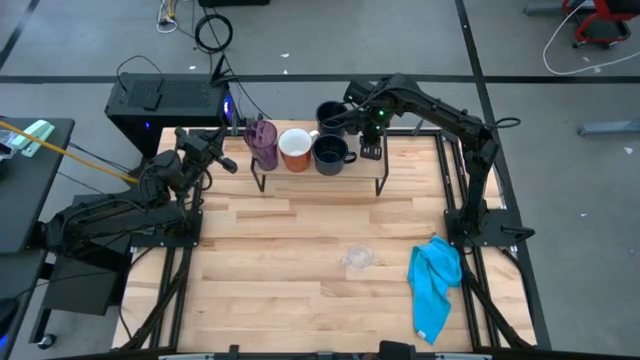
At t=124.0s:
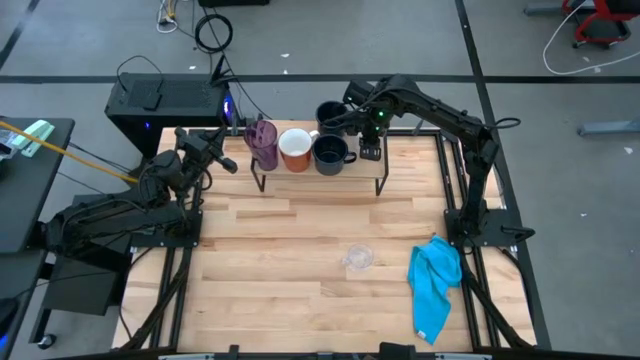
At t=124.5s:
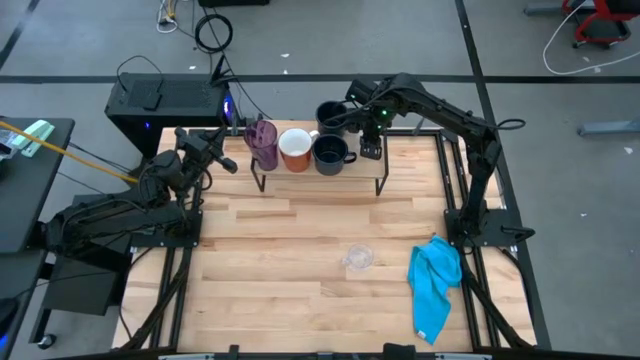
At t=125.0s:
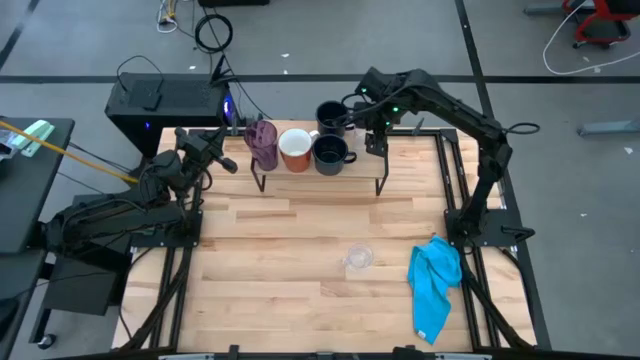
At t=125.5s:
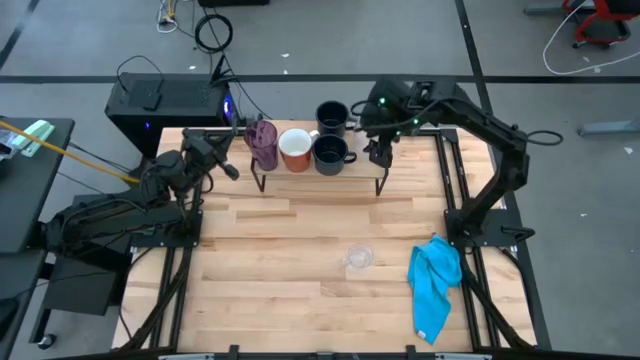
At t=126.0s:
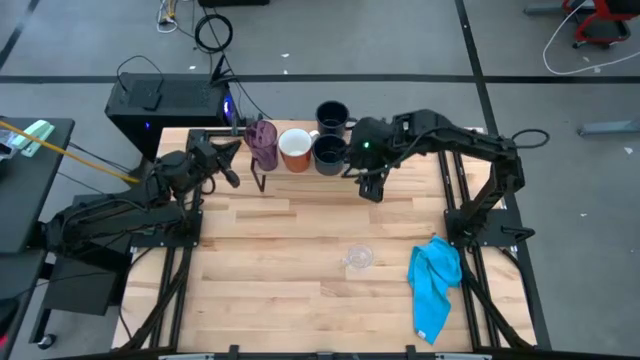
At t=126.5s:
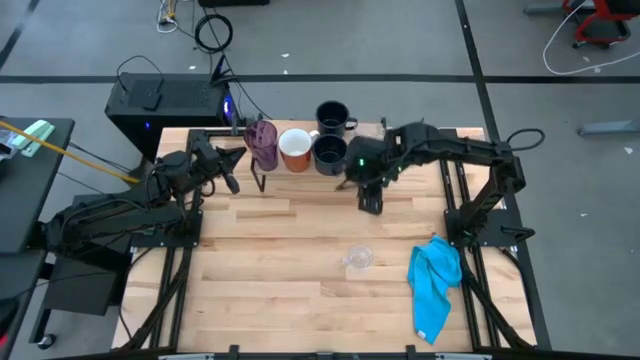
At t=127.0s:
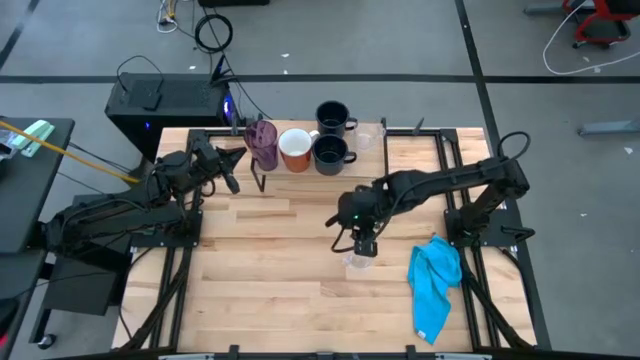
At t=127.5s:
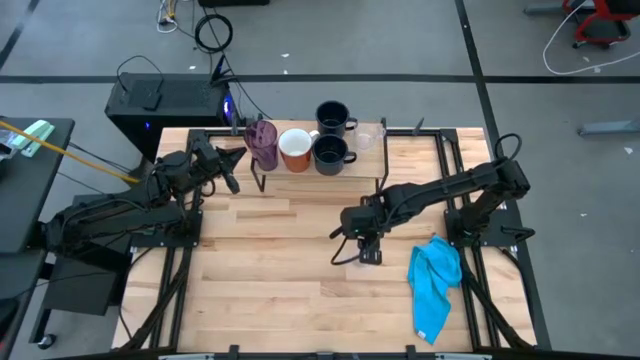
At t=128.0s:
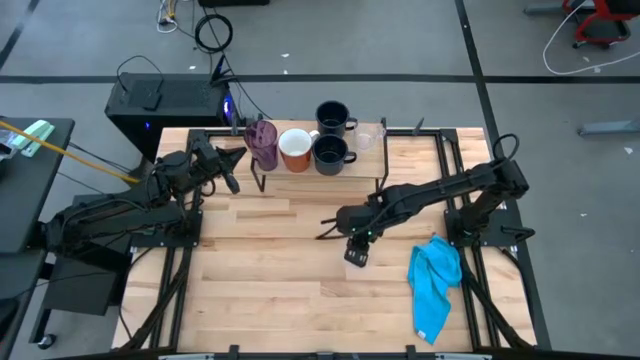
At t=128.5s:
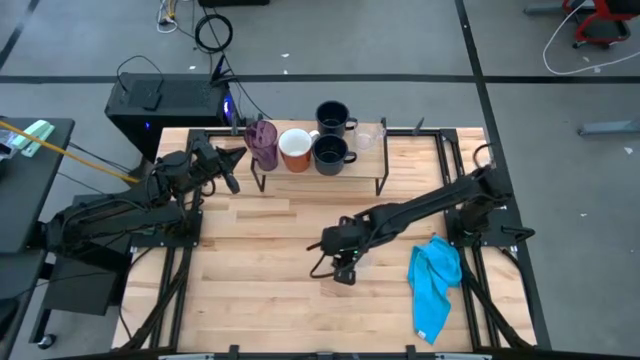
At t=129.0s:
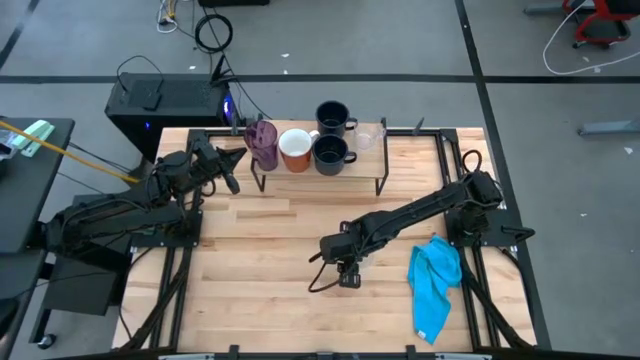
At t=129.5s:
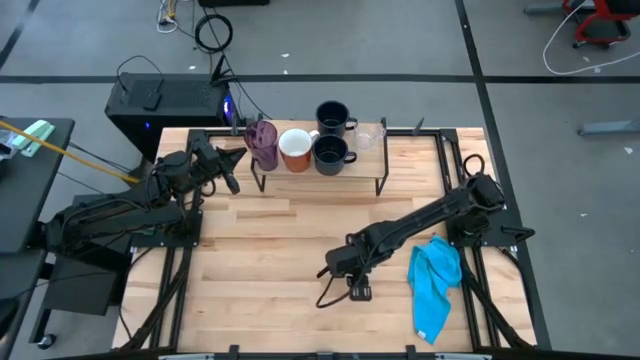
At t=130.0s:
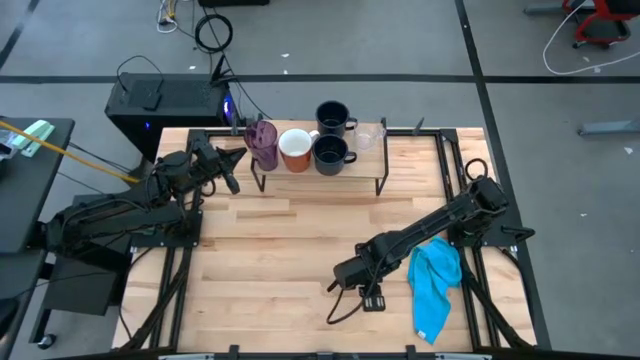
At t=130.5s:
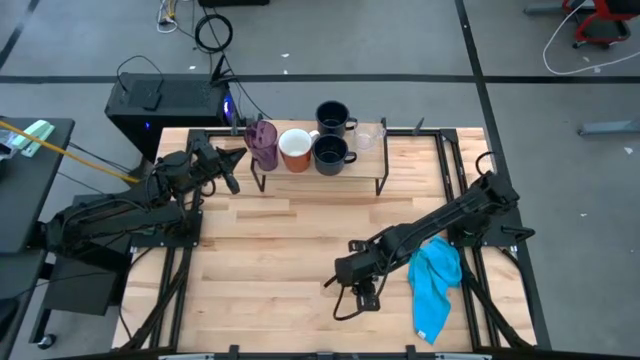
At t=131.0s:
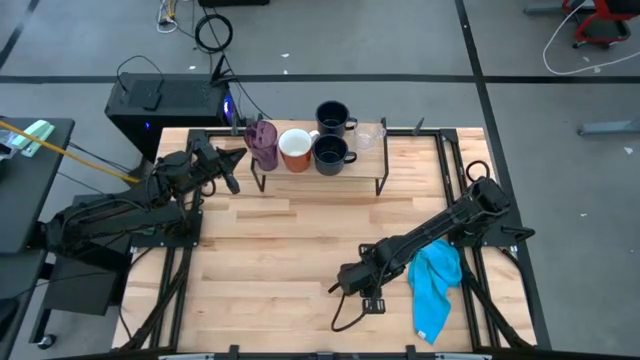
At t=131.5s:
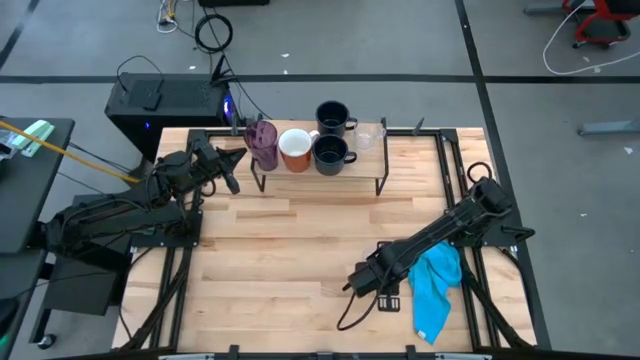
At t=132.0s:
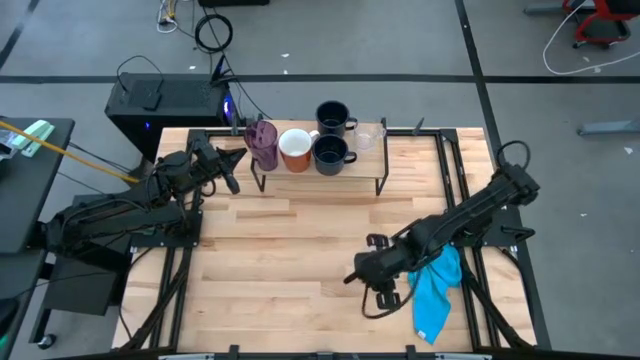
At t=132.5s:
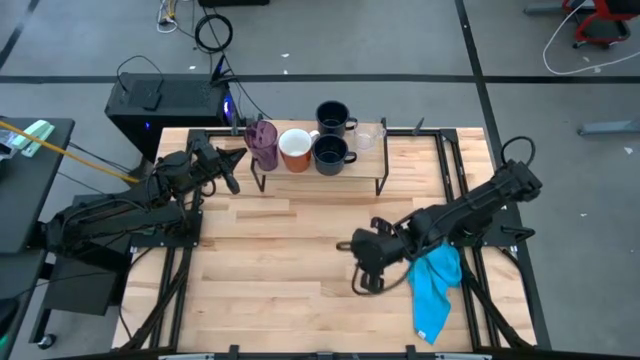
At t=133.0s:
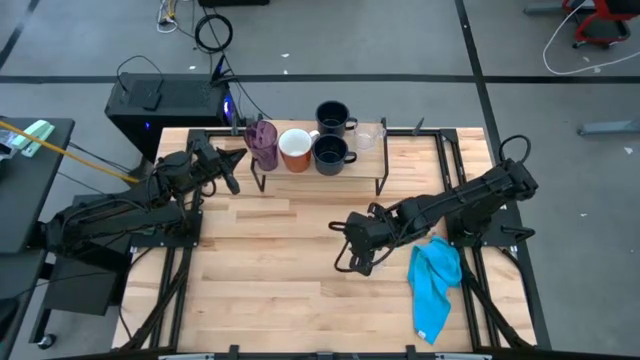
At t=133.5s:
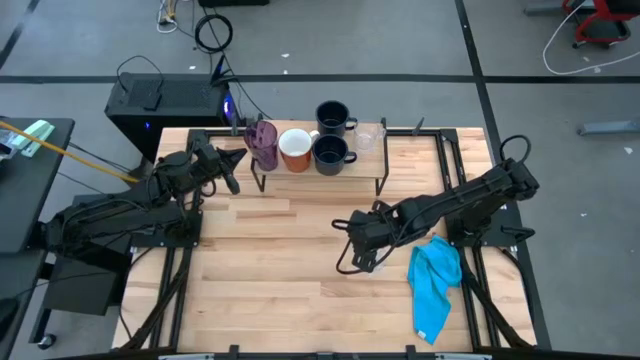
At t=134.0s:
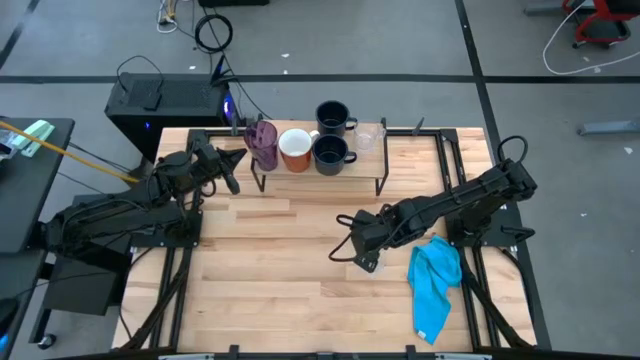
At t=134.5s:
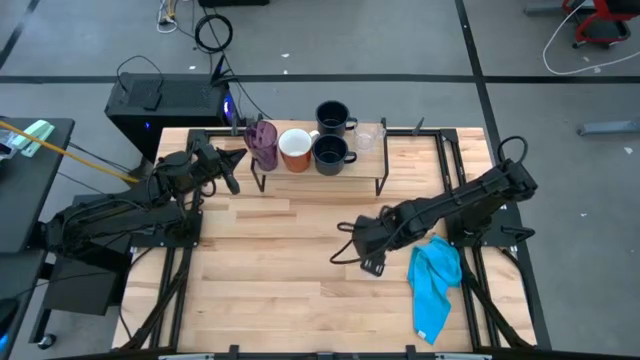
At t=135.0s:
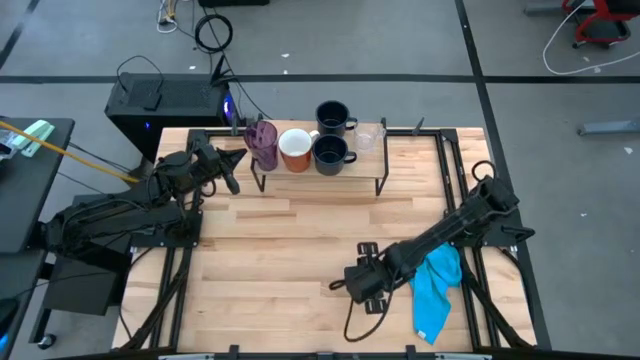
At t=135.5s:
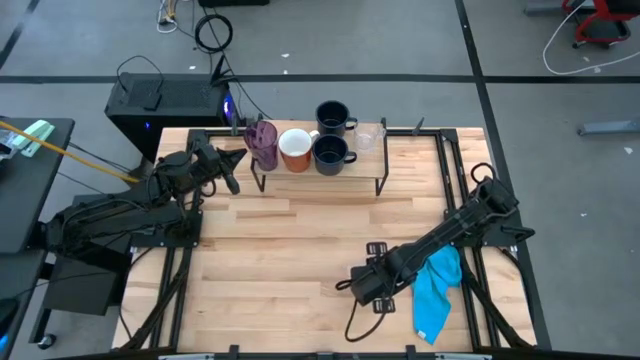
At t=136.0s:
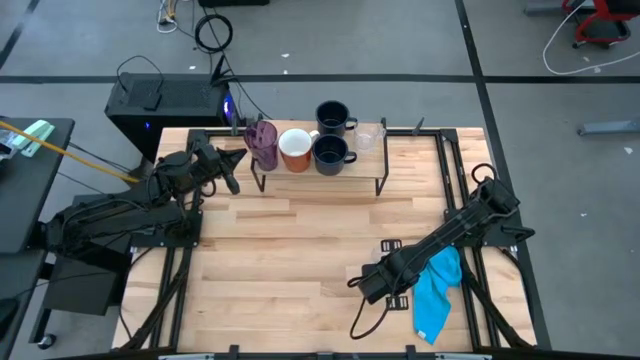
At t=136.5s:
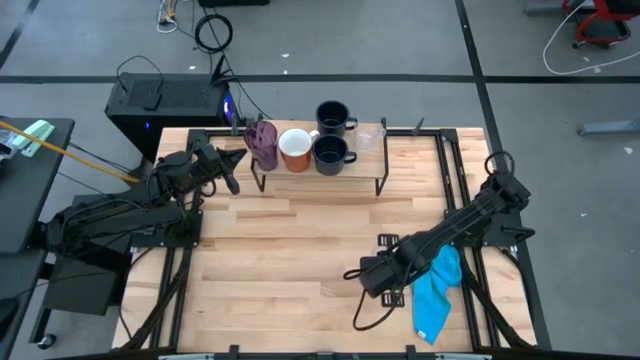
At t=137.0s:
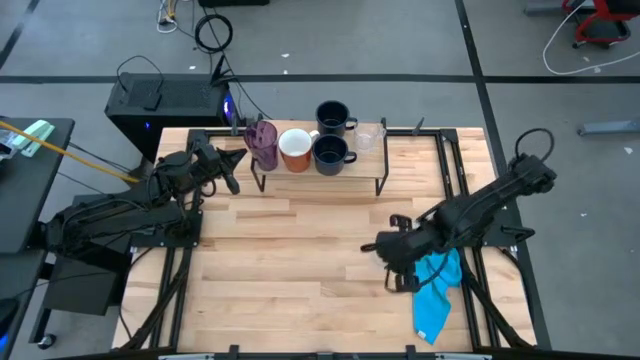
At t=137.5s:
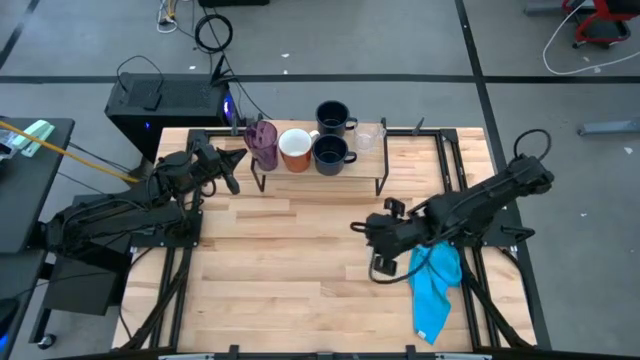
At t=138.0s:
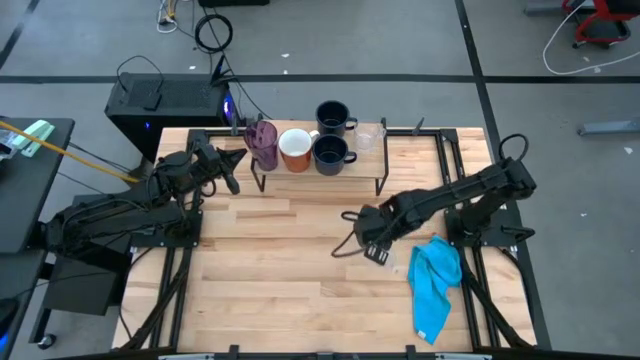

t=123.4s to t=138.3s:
Task: Stack small to large cups/mugs on shelf
Align the transparent mug with the other transparent mug on the shelf
